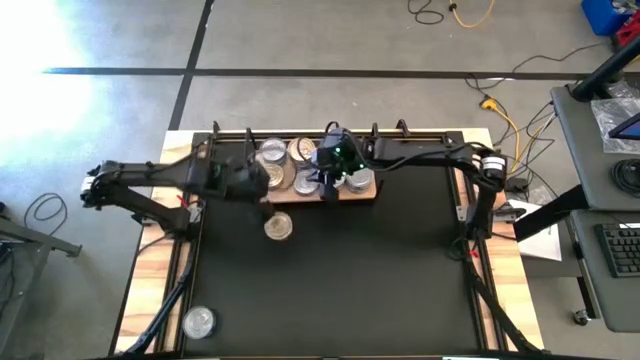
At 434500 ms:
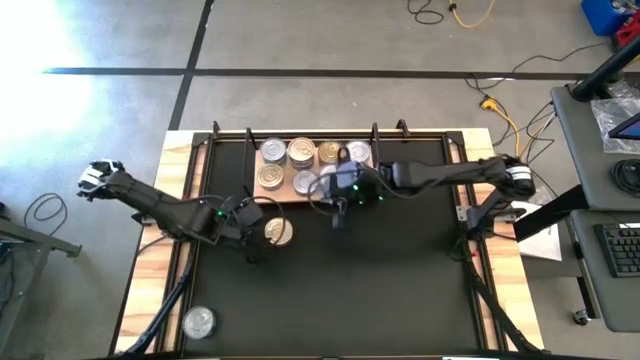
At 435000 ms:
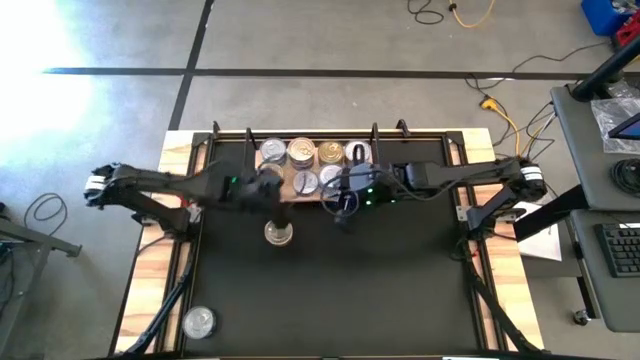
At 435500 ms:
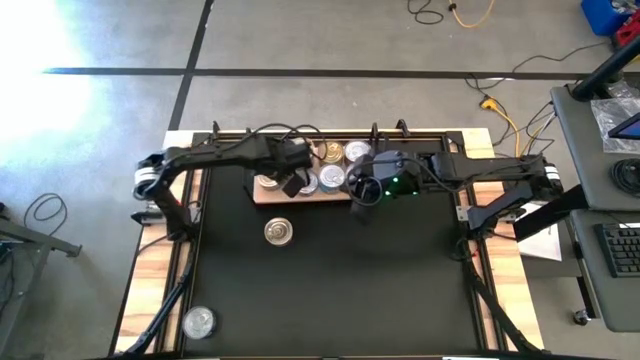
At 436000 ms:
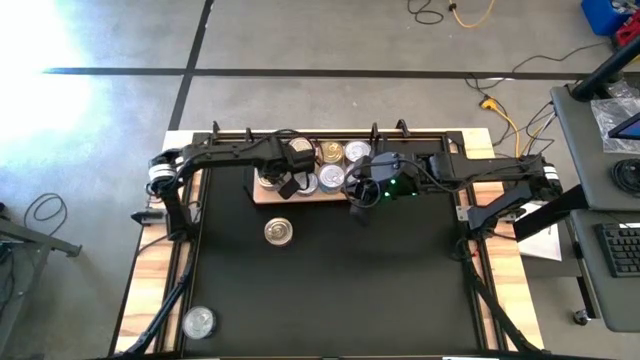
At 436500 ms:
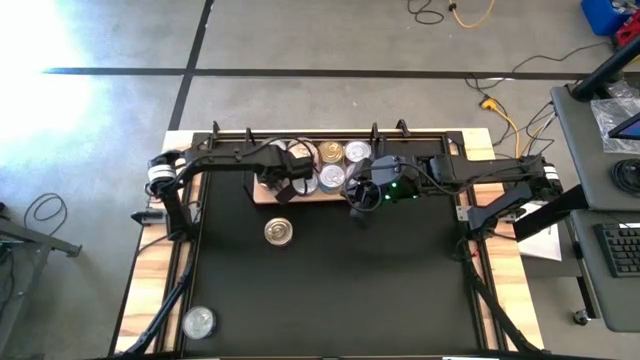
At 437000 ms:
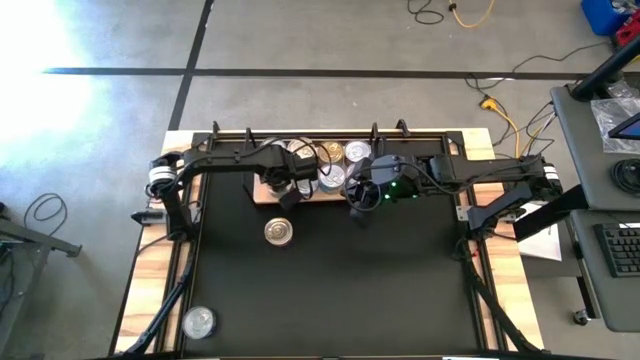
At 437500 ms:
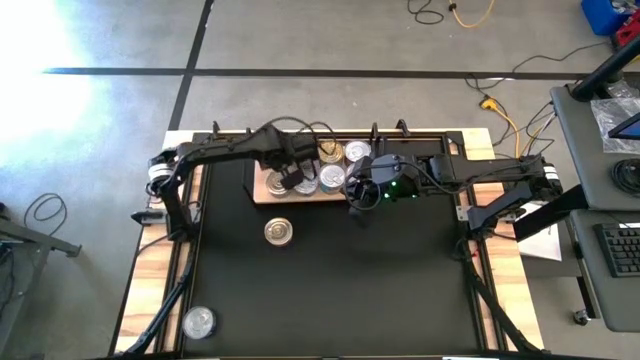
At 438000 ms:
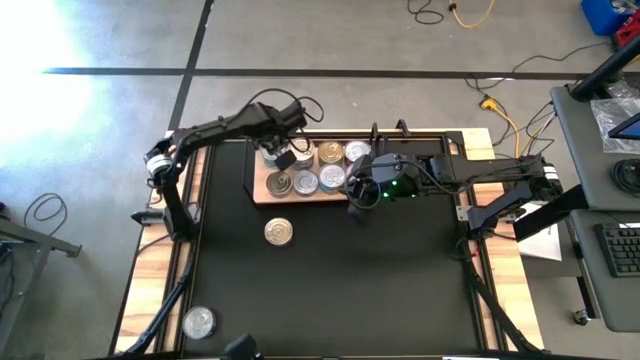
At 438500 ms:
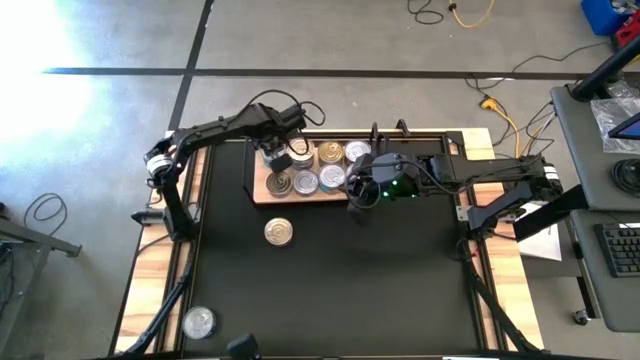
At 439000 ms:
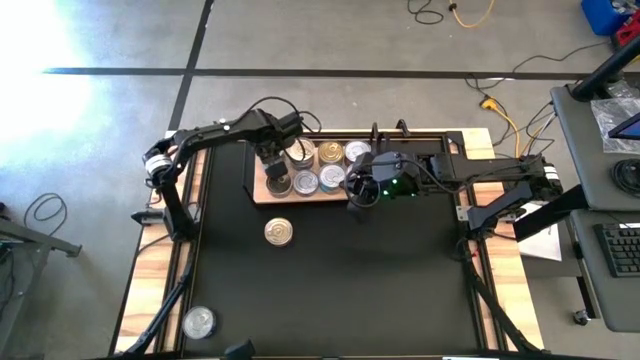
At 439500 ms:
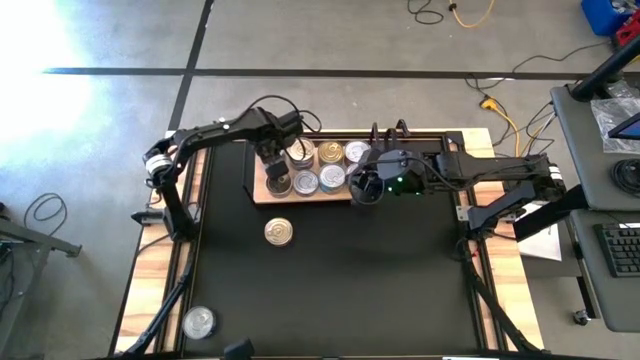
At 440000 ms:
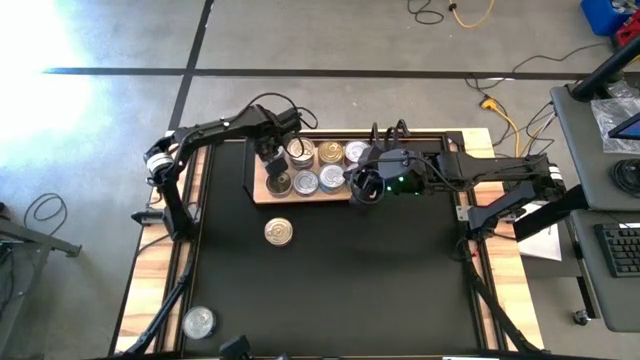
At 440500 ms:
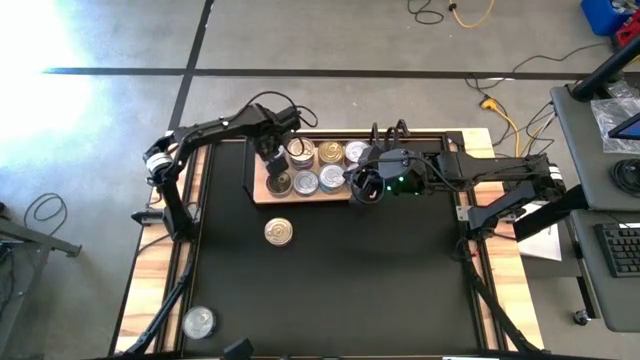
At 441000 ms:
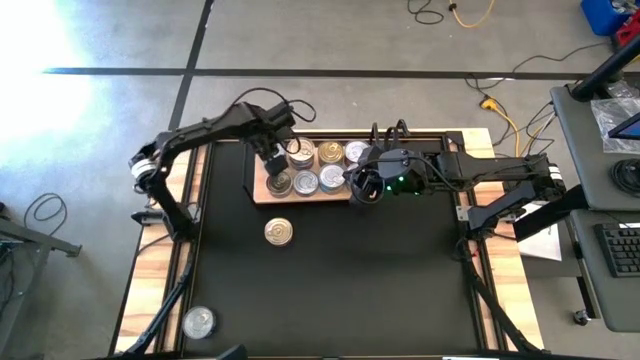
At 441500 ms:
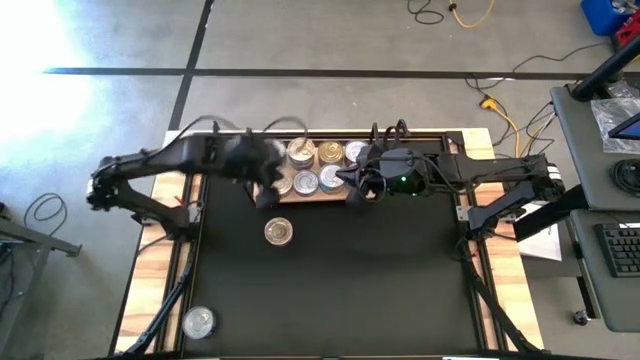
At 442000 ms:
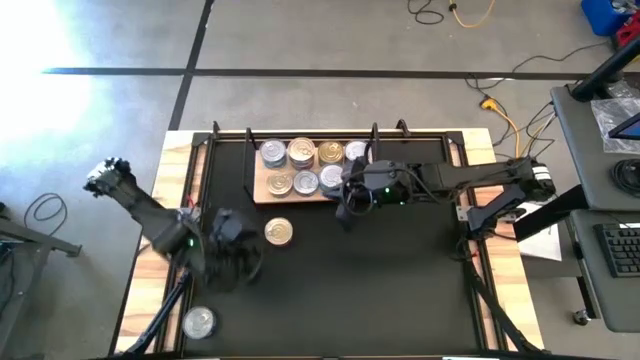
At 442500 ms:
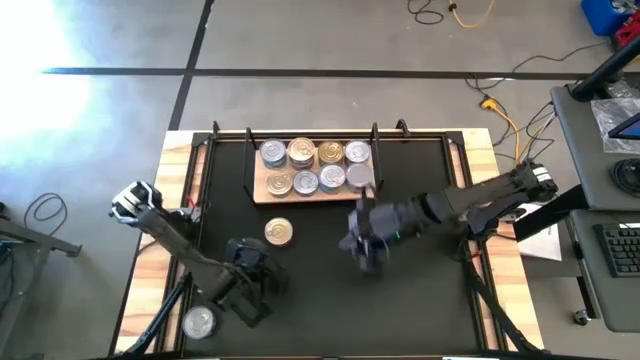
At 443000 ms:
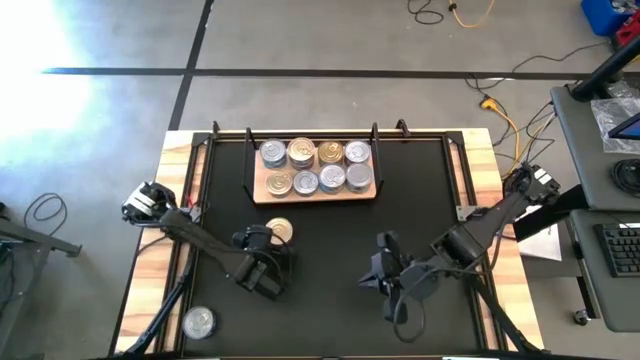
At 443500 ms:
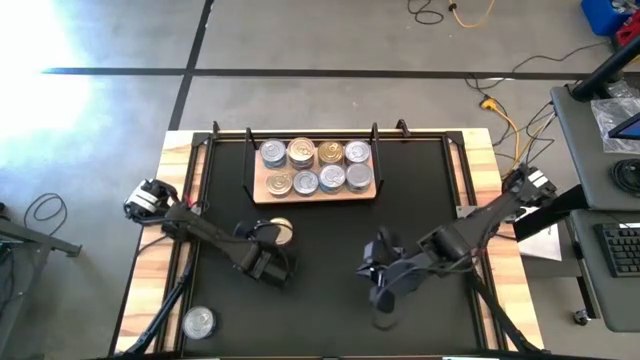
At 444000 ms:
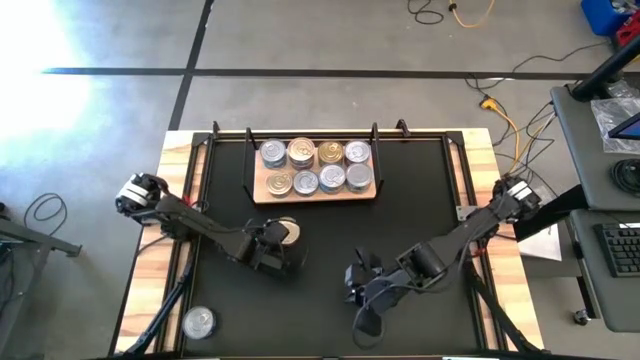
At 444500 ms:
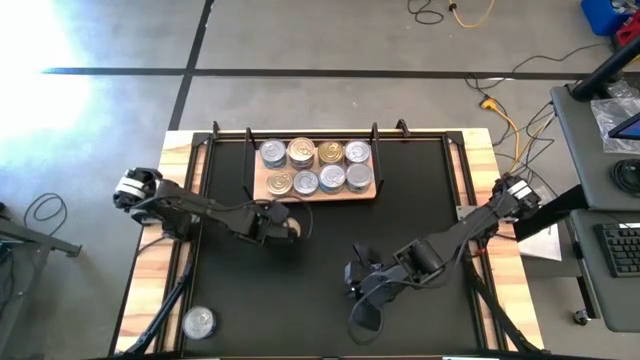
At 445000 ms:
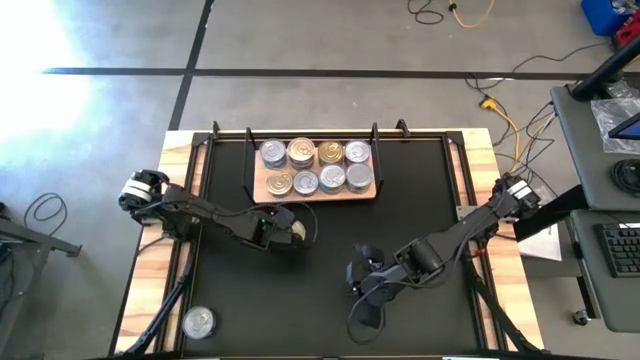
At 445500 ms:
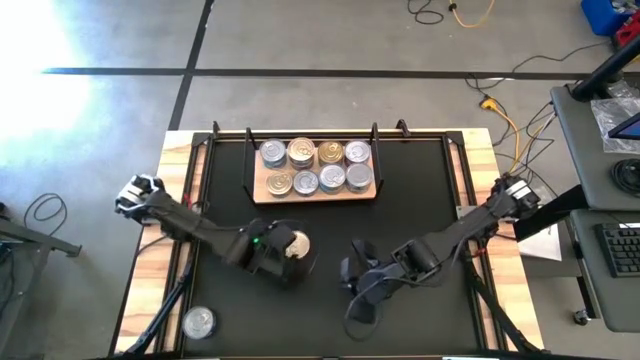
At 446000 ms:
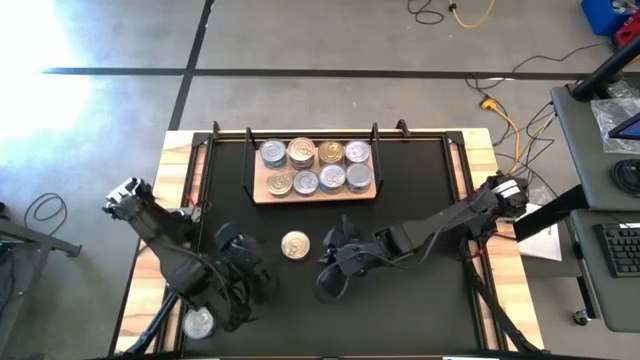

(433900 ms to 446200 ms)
Task: Stack canned seafood by type on shelf
Stack the blue-pink tuna can on top of the other blue-pink tuna can on the shelf
